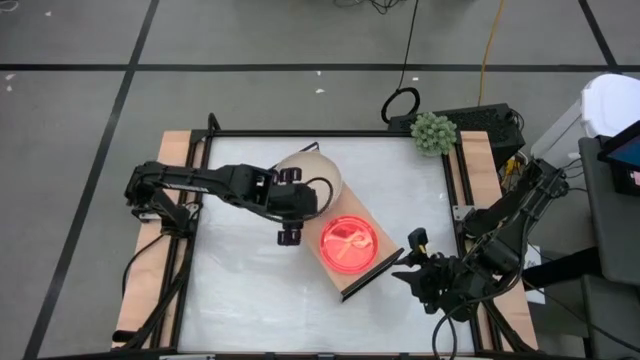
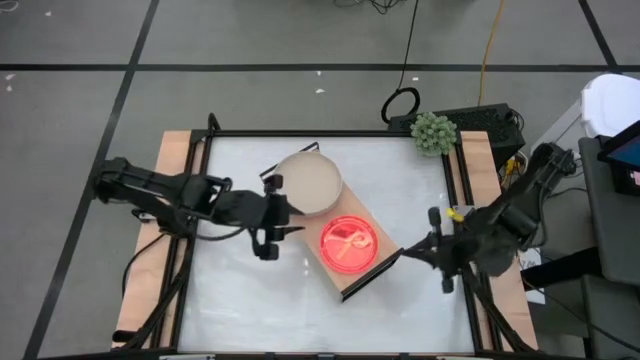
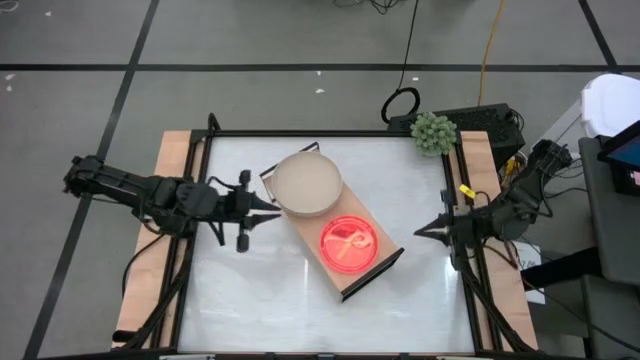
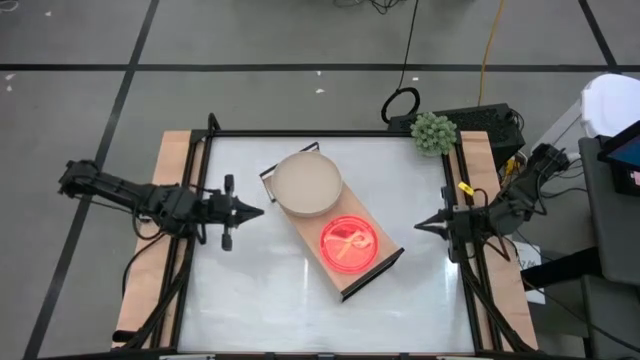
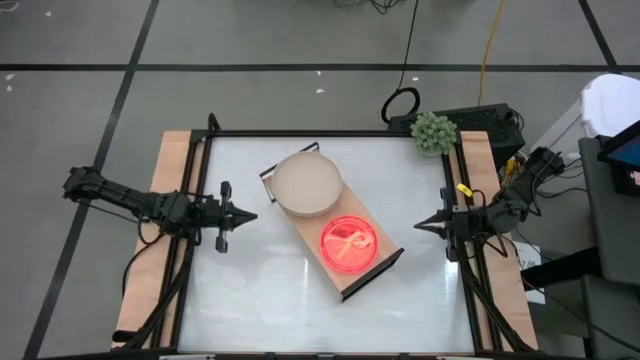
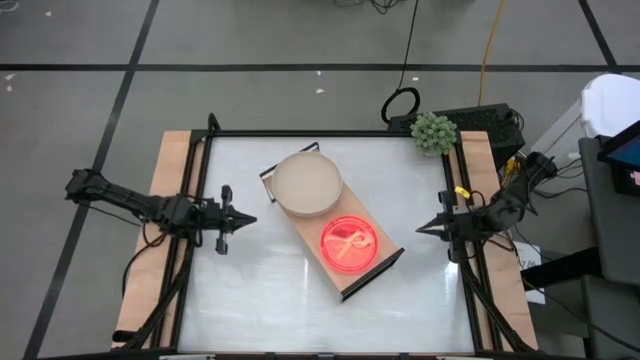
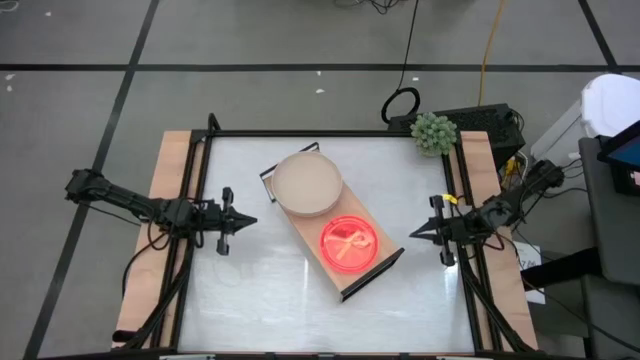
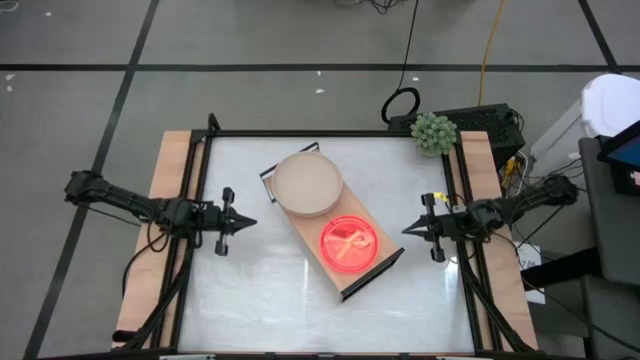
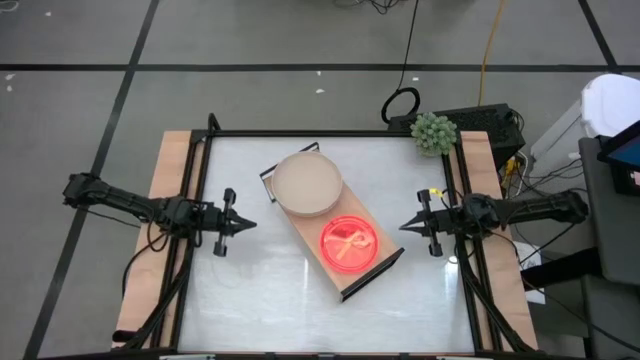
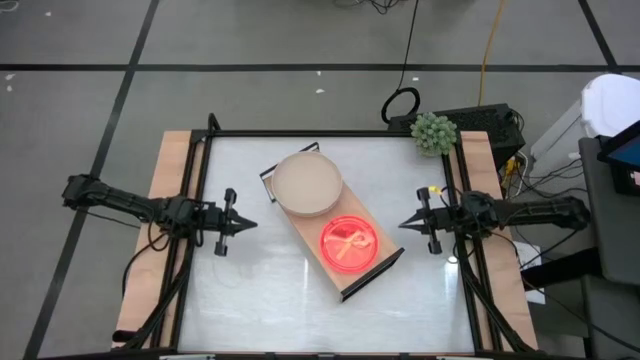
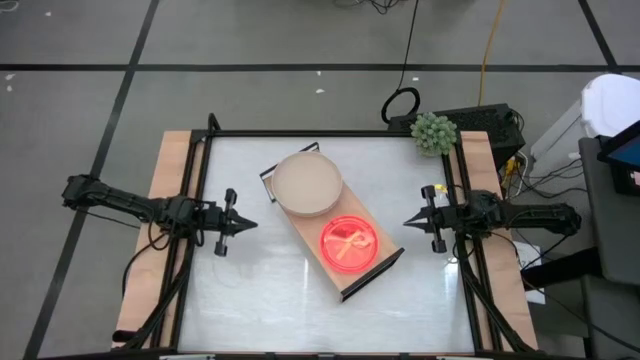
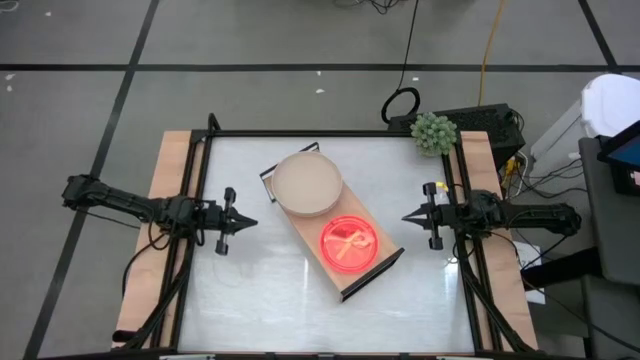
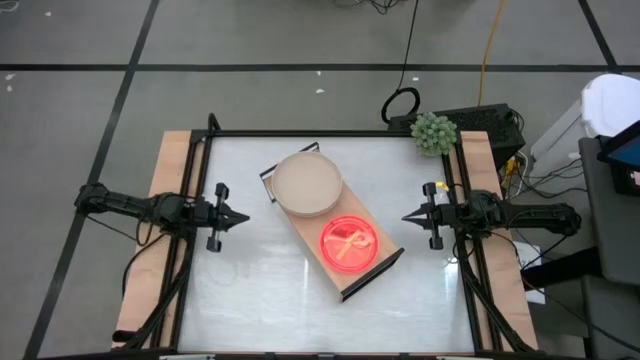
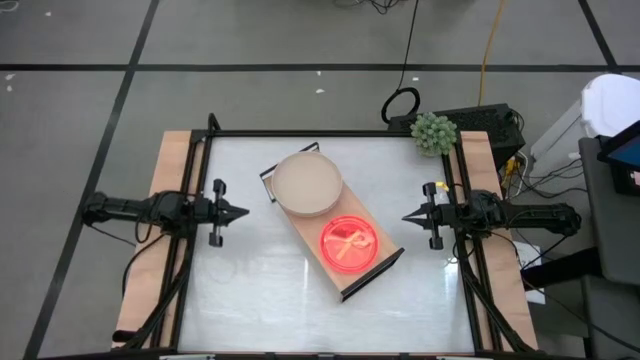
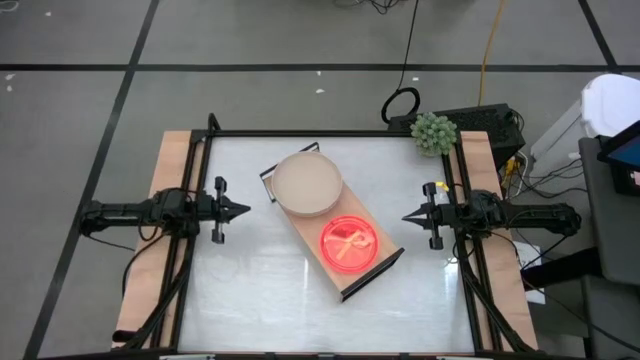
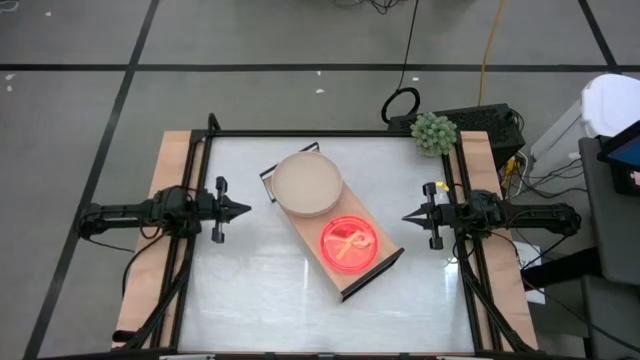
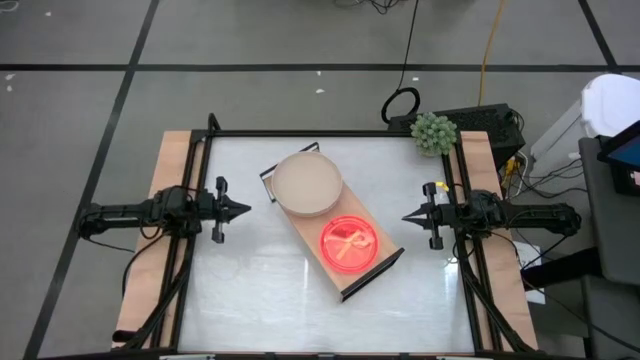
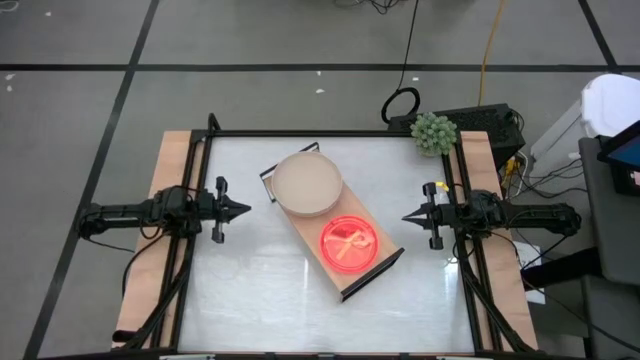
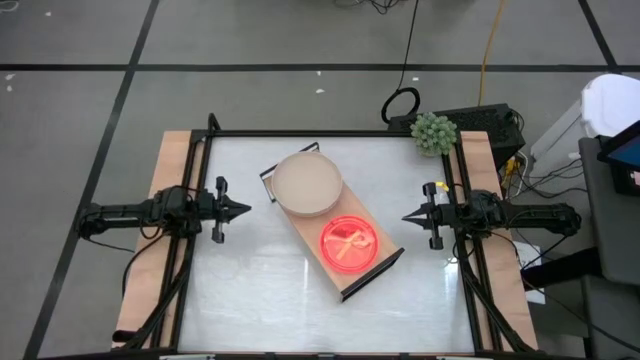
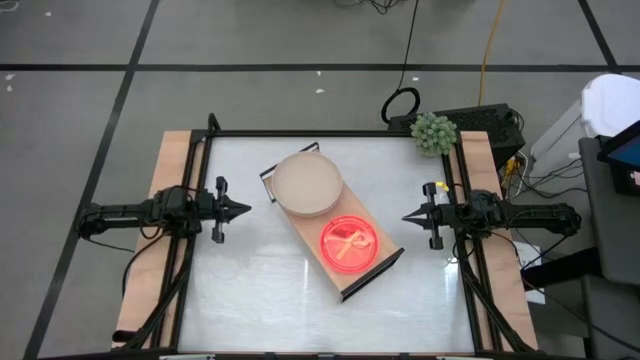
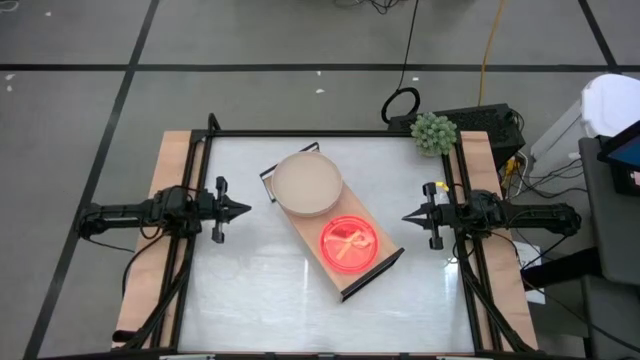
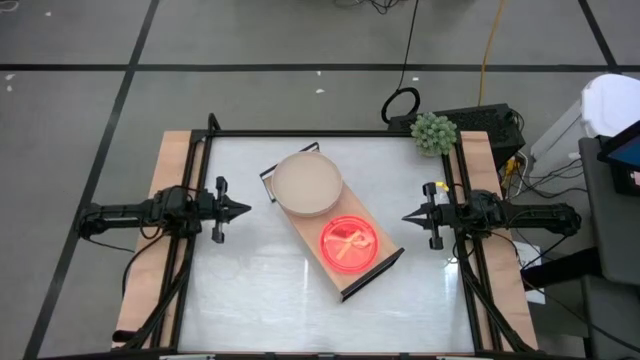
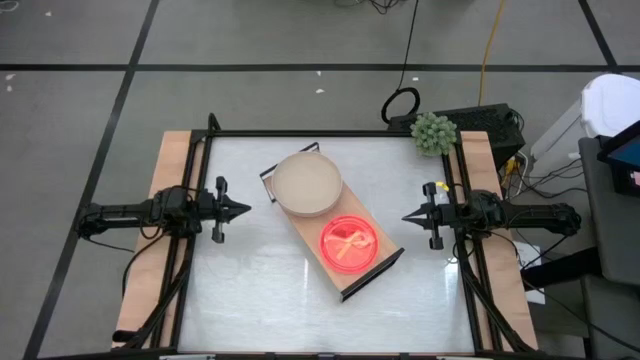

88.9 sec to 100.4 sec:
Task: Place and stack plates onto a shelf
Return to Home Position

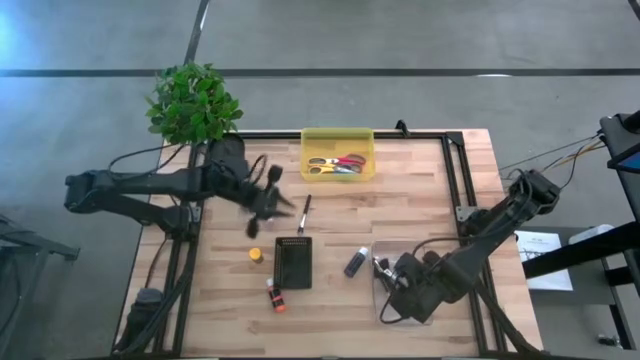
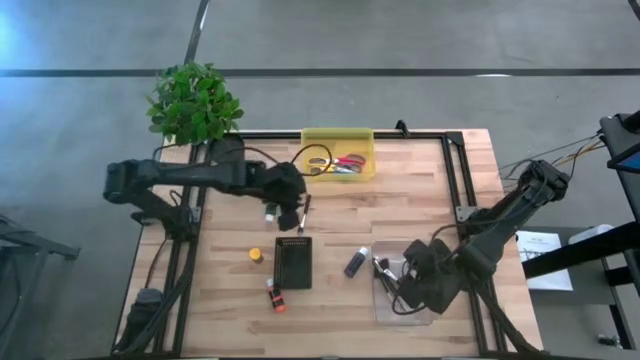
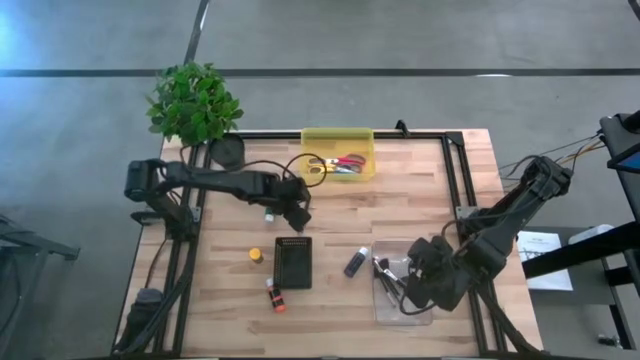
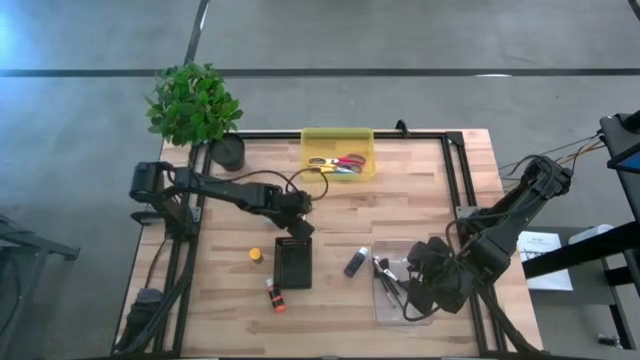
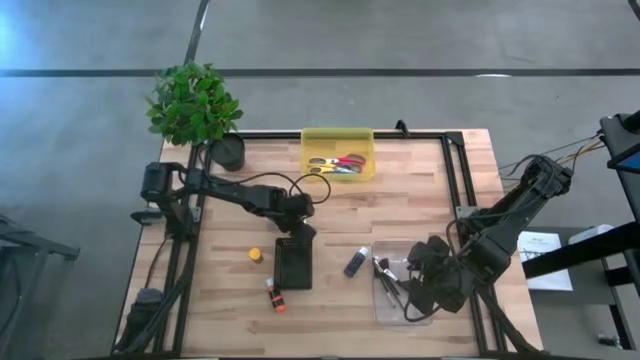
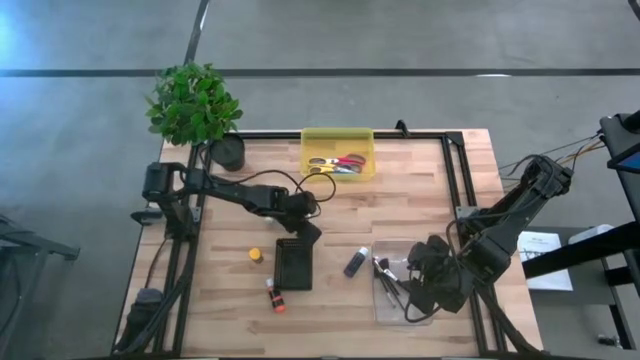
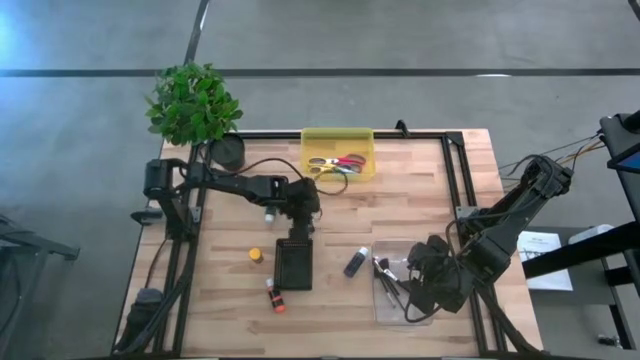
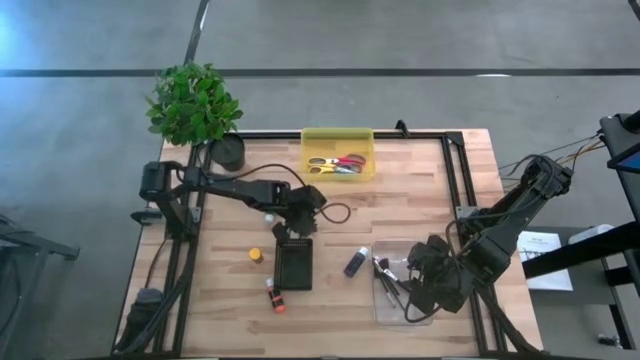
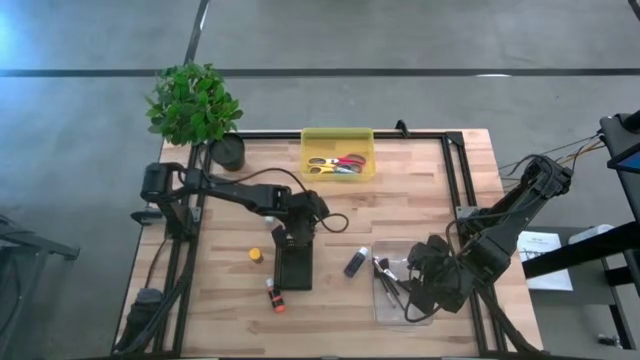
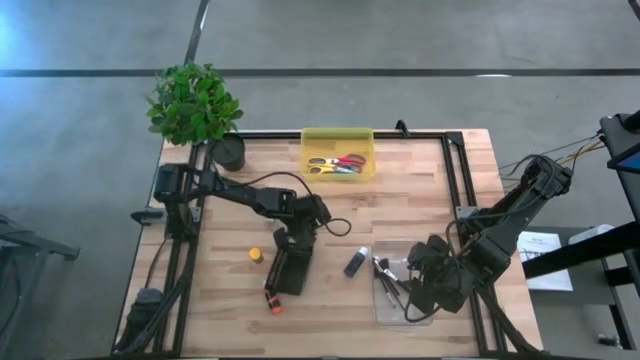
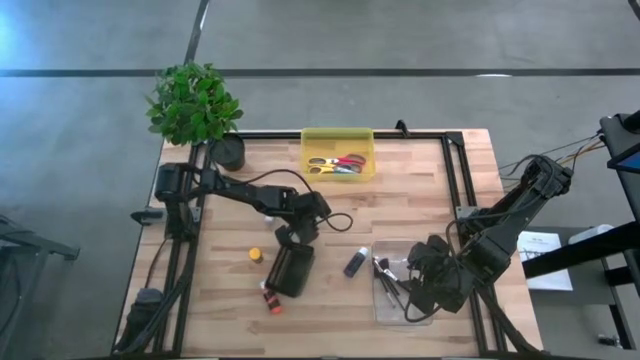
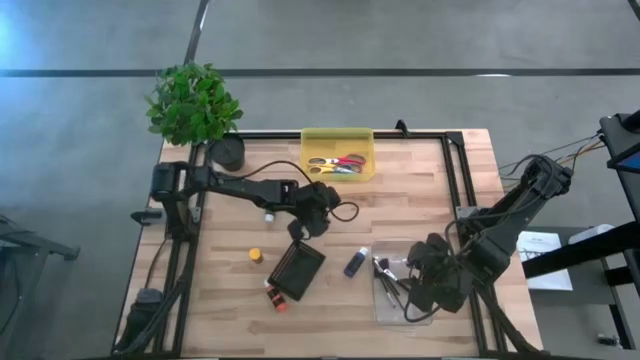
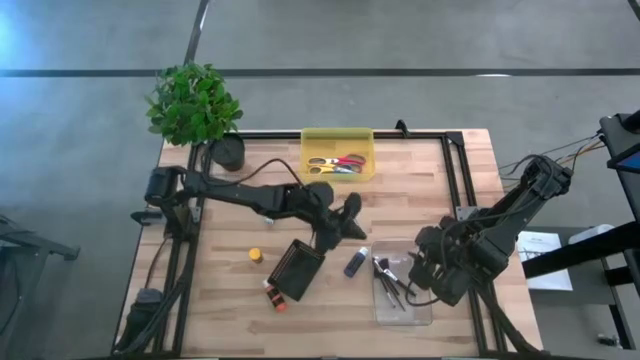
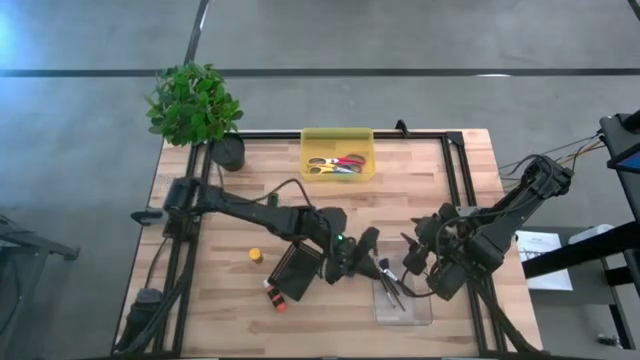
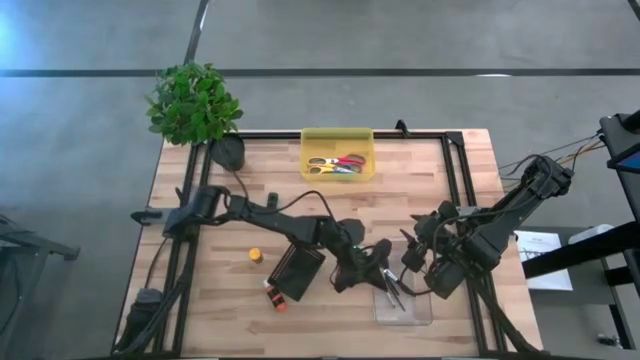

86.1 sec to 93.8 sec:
Task: Pick & Place Paint Supplies
Put the foundation brush into the transparent bin

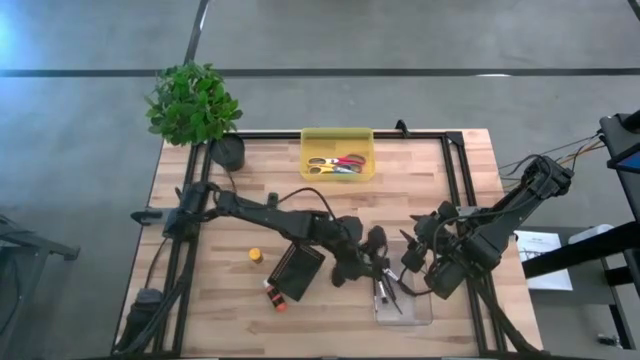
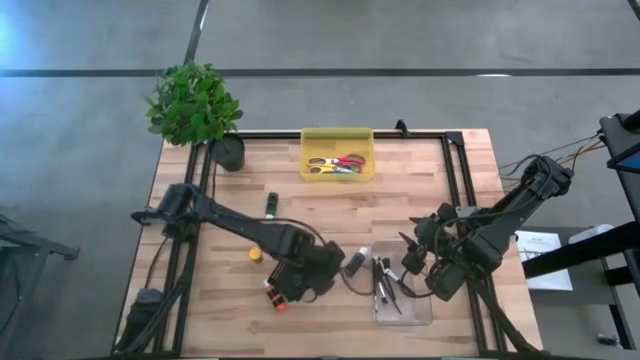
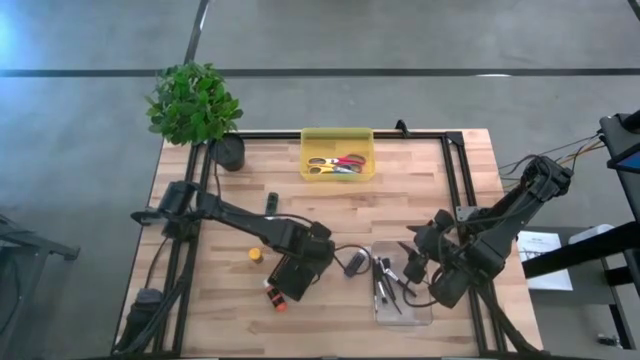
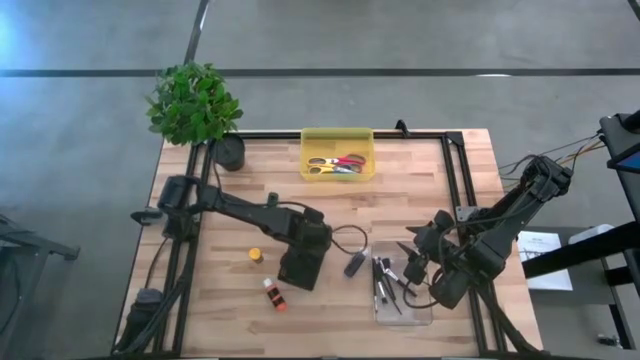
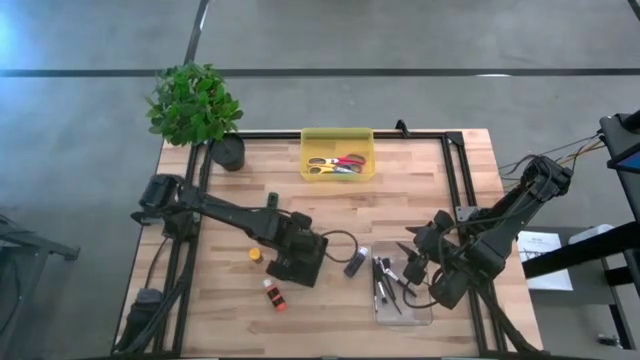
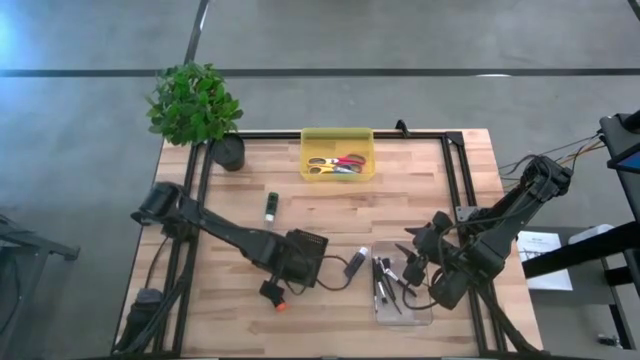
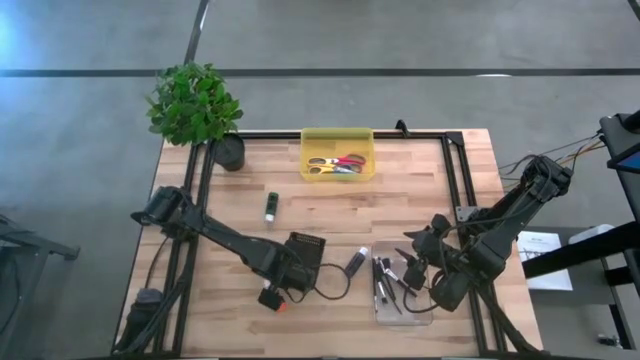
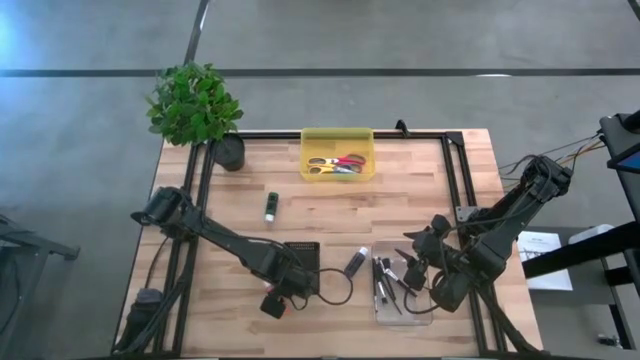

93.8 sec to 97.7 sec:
Adjust the black bin
